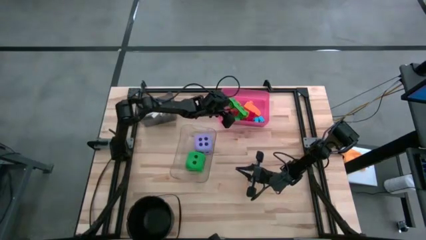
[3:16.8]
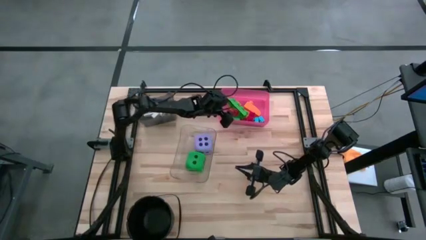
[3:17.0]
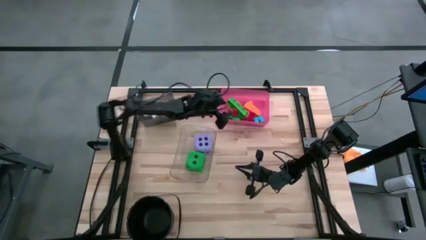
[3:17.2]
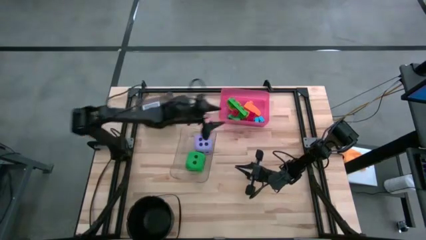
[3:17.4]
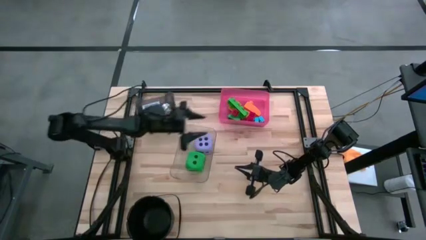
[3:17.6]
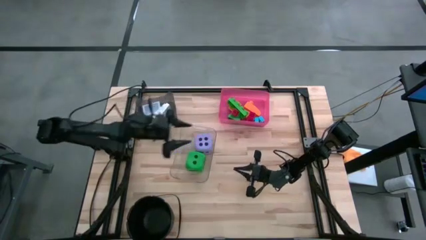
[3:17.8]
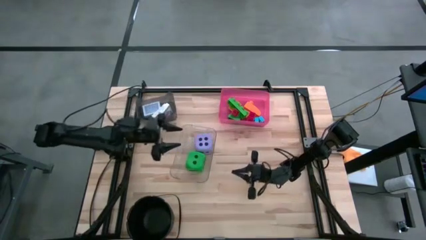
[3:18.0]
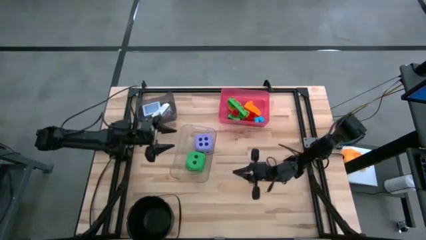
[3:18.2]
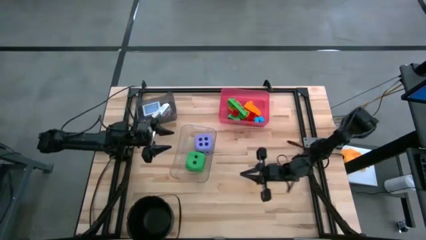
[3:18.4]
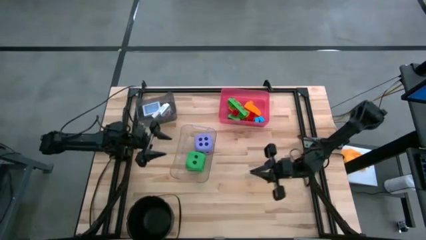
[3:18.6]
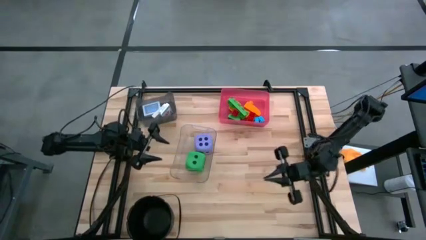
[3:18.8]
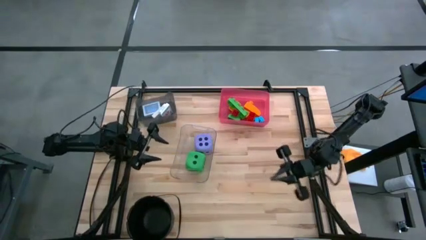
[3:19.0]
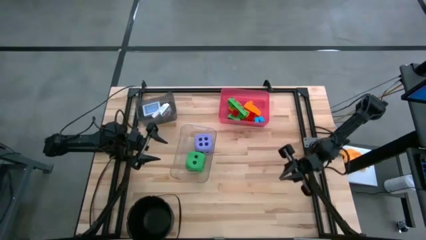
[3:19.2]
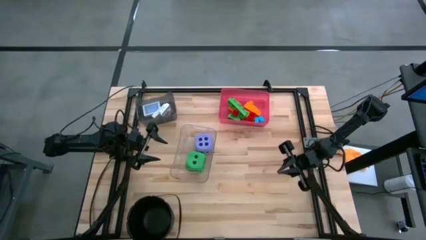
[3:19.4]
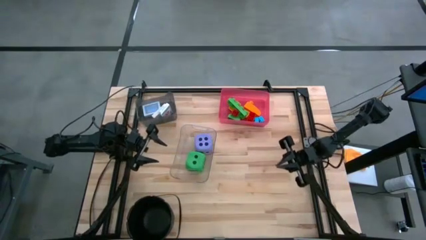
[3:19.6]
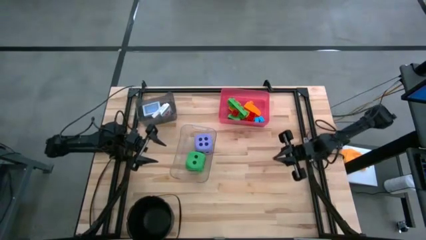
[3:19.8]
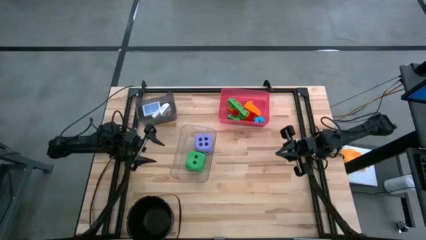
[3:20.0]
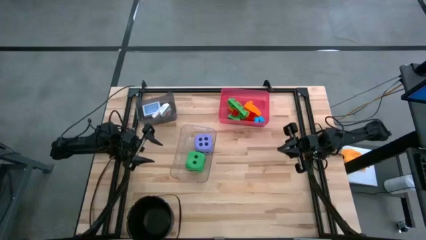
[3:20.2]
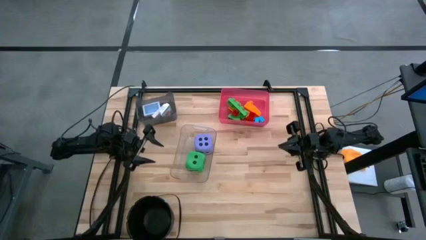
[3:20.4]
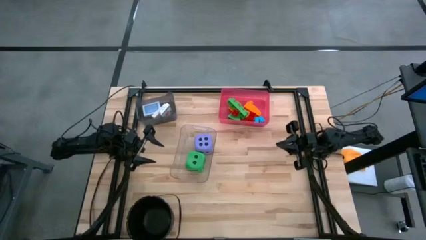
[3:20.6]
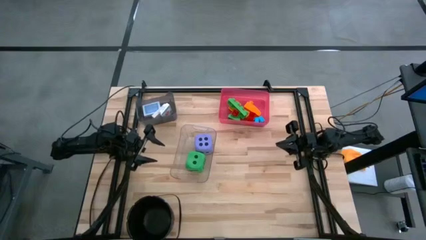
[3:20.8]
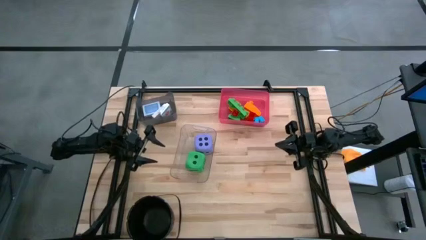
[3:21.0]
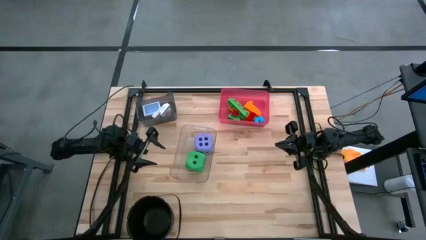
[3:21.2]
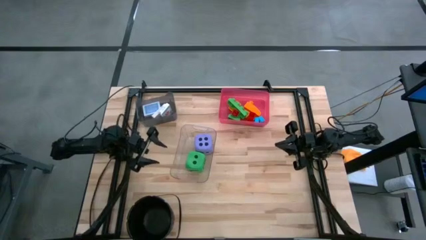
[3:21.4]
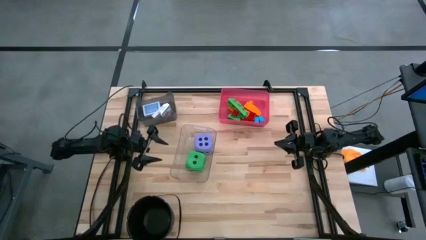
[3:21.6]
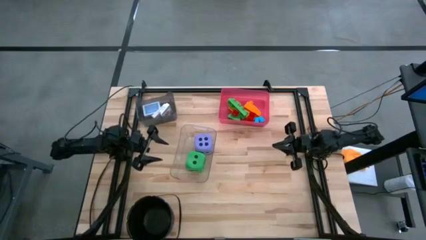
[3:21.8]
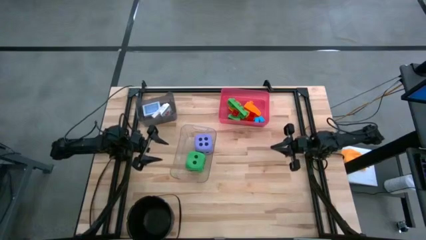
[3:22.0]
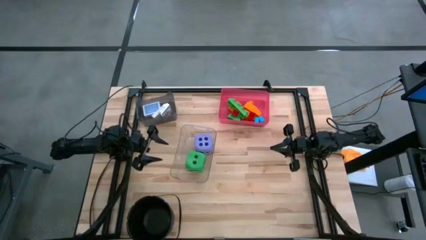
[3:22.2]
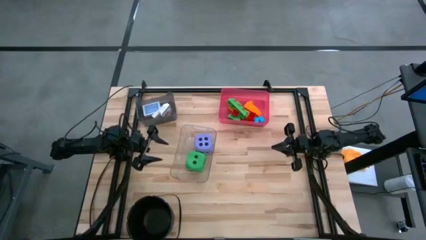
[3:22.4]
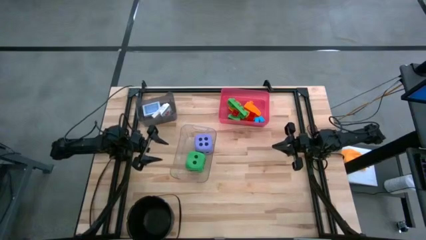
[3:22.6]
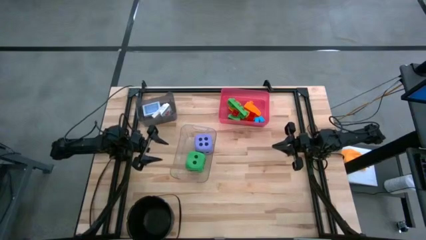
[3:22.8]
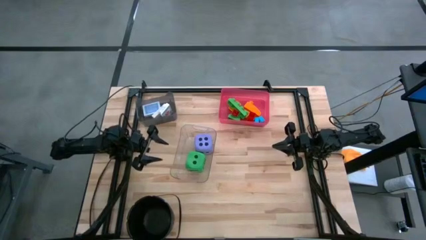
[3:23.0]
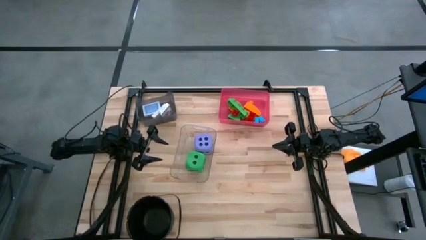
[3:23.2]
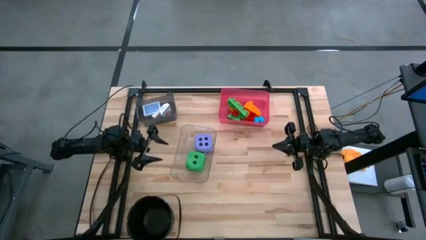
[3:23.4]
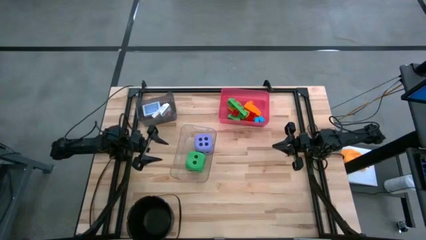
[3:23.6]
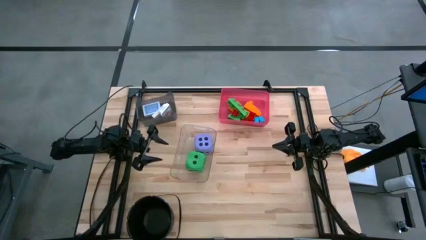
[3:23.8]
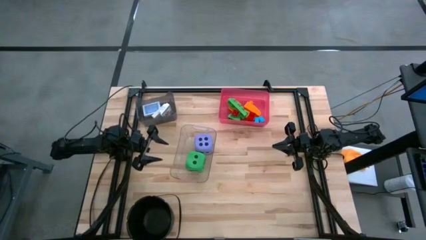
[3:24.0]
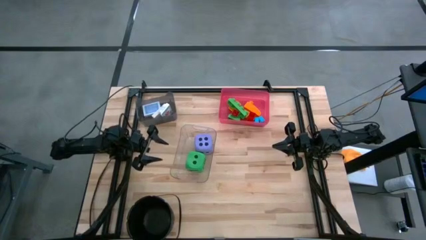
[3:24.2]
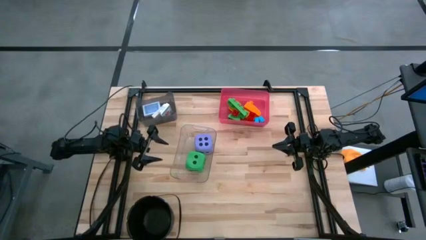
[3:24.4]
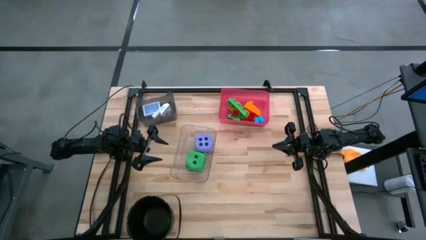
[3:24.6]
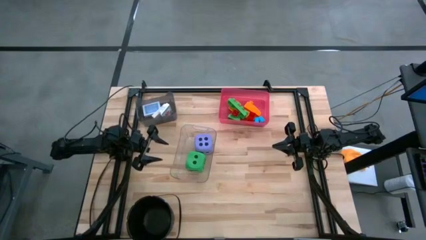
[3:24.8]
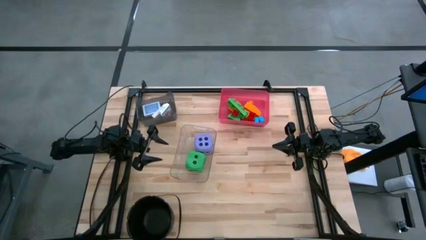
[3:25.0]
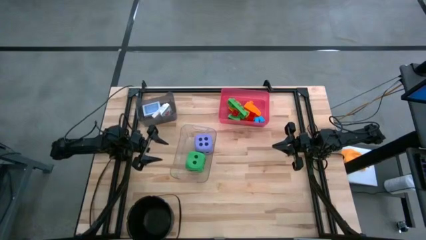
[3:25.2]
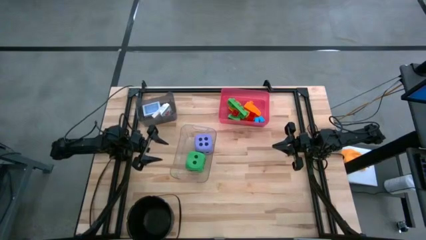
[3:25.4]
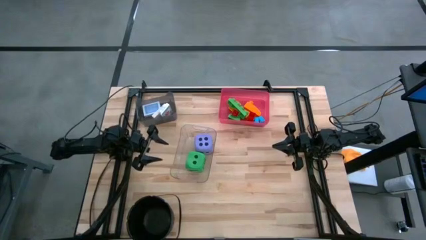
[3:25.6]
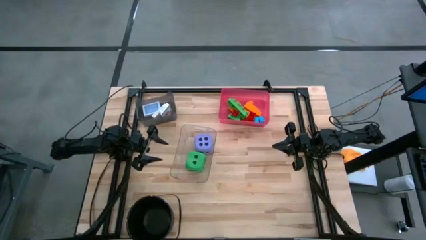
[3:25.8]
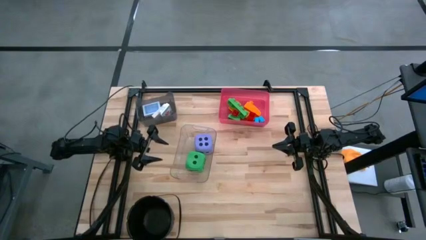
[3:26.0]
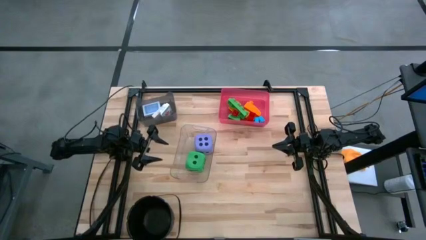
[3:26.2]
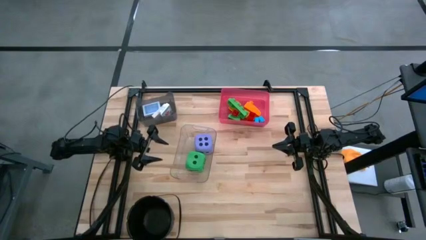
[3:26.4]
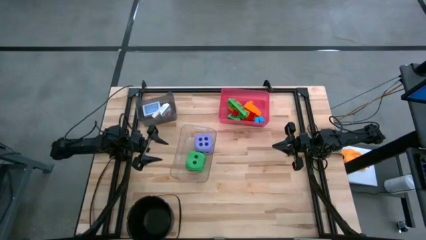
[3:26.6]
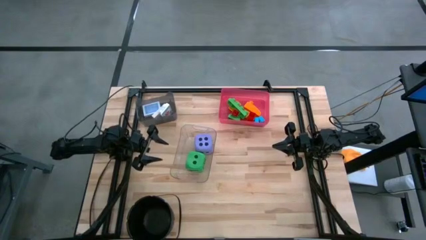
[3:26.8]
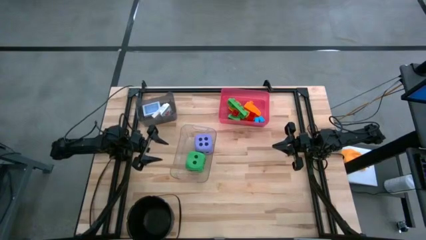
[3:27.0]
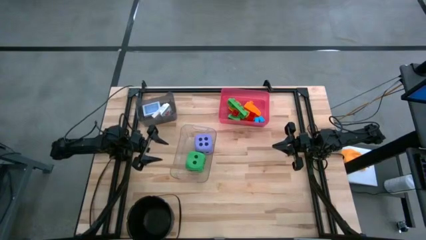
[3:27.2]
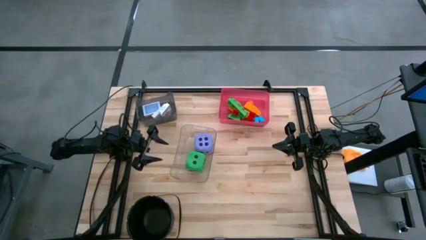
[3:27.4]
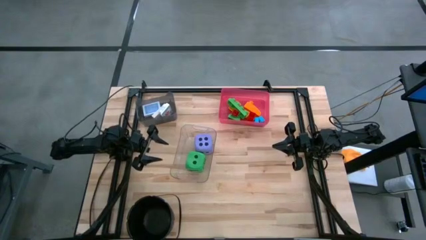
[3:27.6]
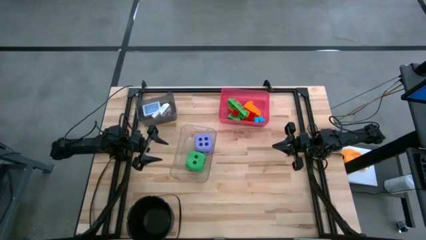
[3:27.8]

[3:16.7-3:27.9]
Task: Pick & Place Toys
Return to Home Position

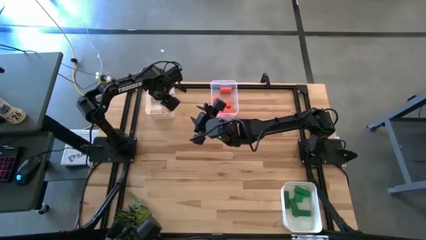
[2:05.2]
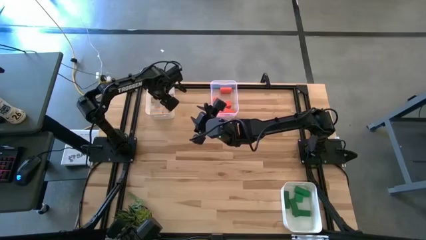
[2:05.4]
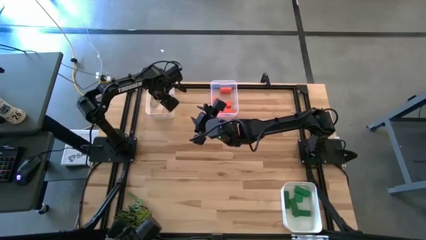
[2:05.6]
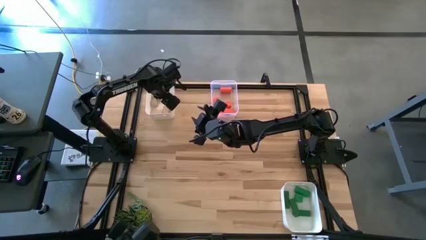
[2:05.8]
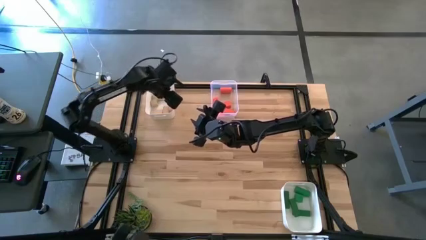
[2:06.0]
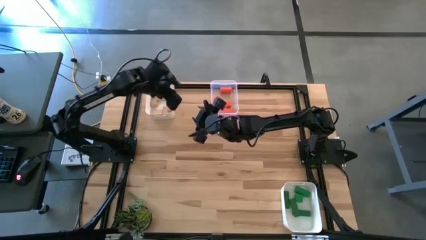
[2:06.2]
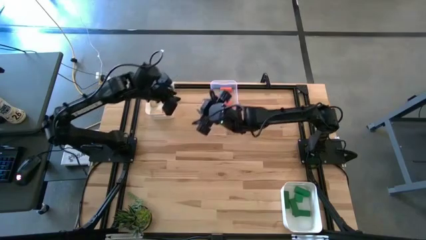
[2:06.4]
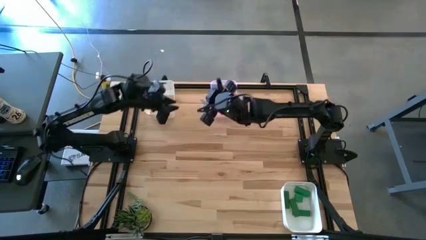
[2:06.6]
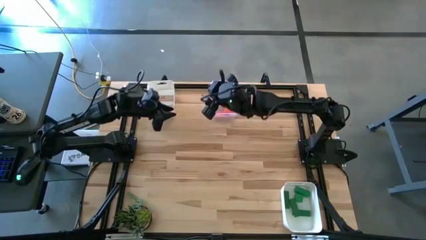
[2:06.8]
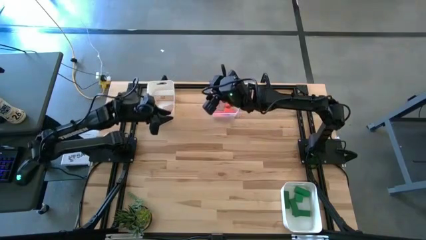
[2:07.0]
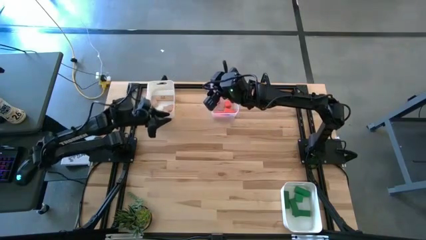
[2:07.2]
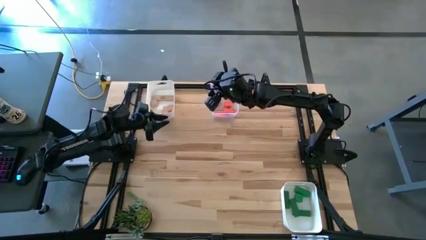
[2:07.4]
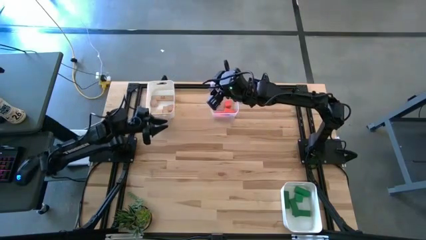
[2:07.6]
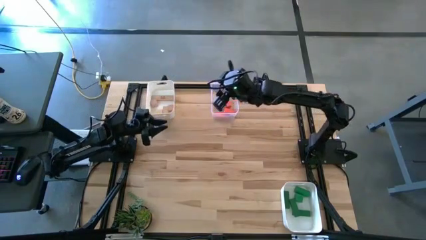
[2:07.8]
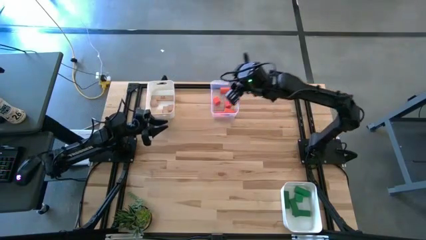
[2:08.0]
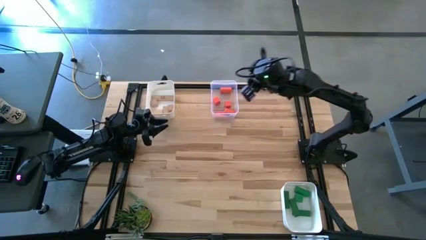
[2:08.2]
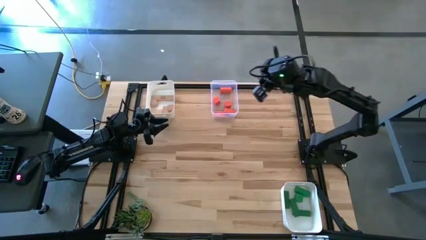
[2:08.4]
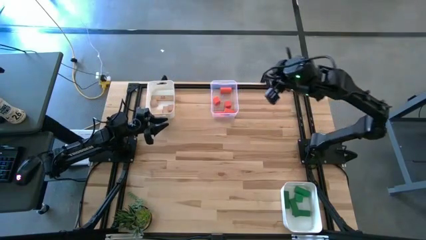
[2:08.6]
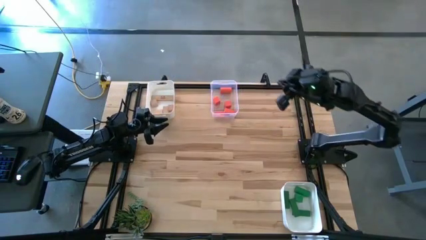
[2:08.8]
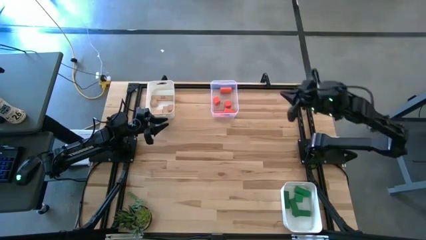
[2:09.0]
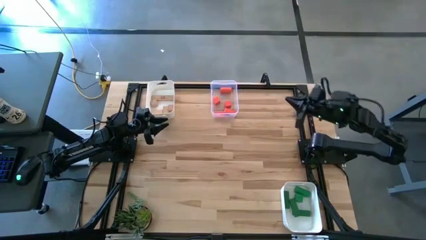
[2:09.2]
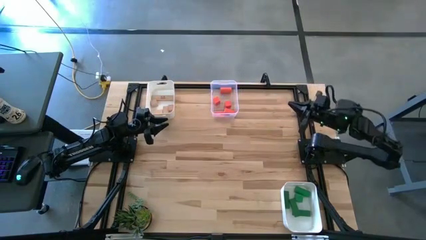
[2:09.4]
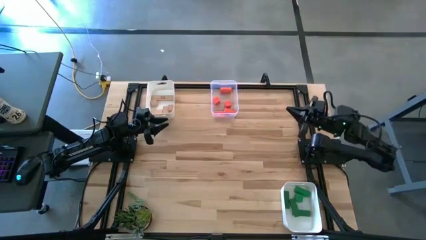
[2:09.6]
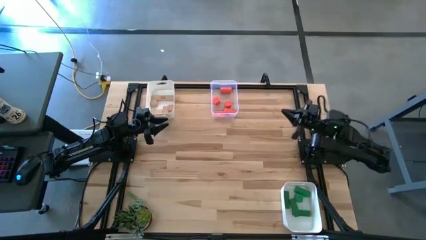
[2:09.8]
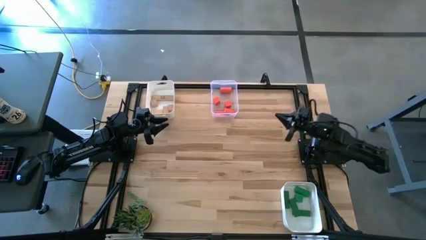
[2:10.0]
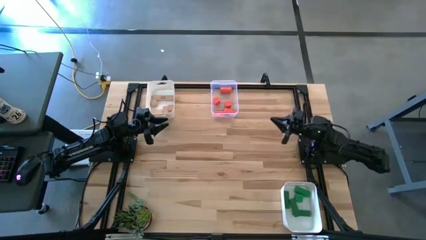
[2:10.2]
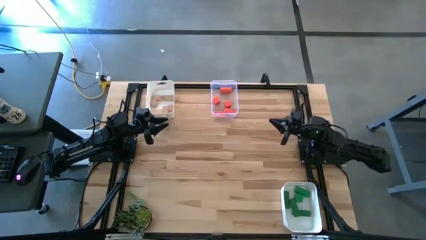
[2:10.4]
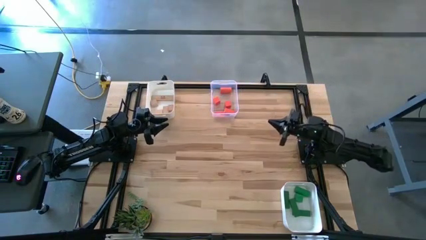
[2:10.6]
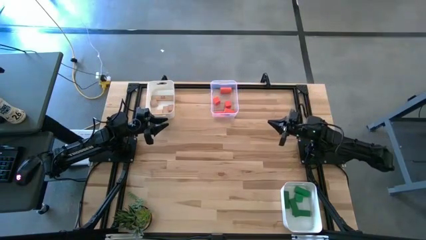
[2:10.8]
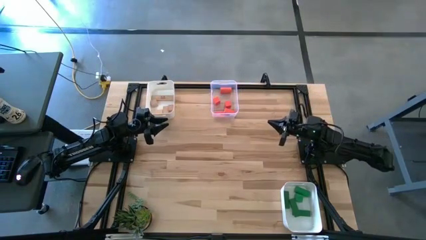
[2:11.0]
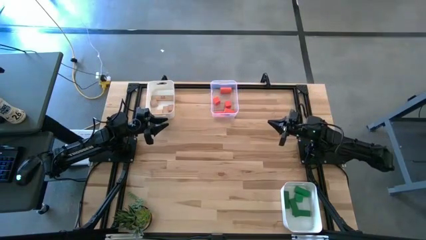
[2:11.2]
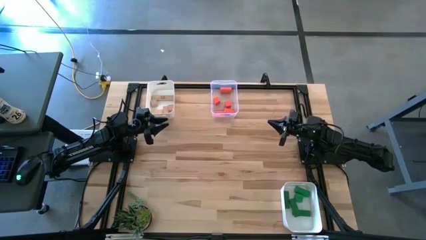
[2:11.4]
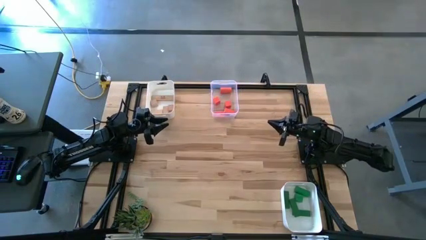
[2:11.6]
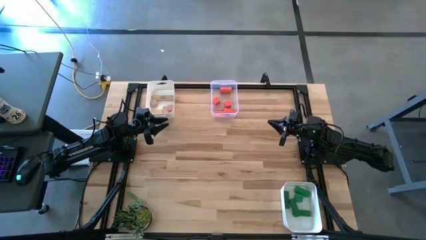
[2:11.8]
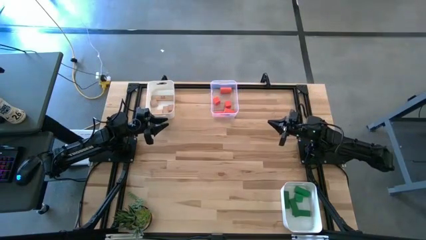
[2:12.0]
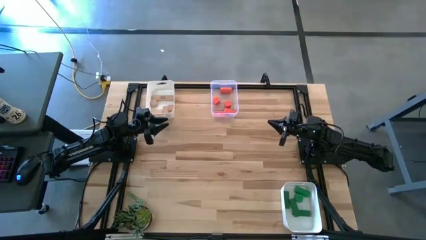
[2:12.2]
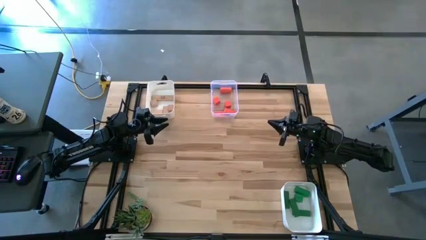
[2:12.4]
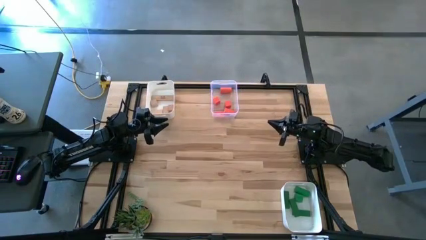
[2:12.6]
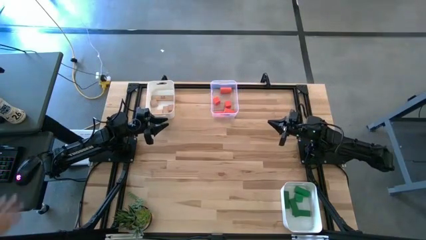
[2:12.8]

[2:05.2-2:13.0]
Task: Sort & place blocks by color
Return to Home Position
